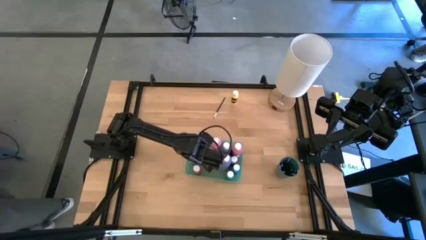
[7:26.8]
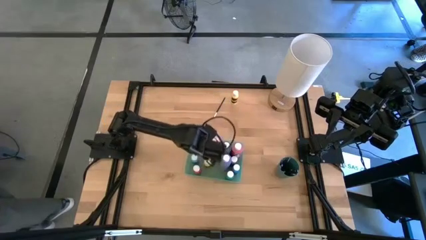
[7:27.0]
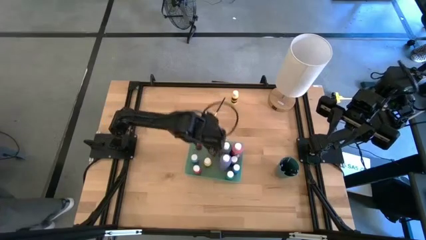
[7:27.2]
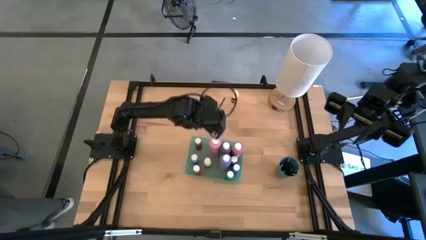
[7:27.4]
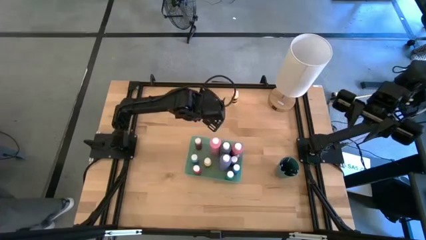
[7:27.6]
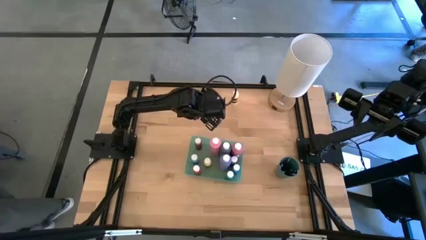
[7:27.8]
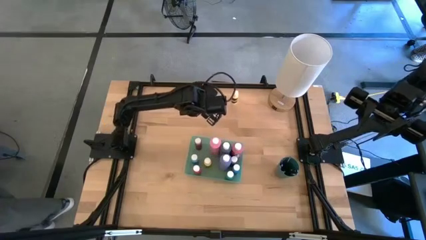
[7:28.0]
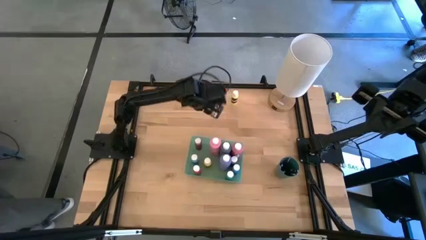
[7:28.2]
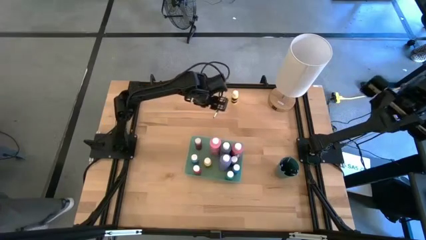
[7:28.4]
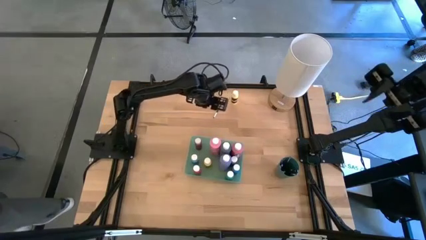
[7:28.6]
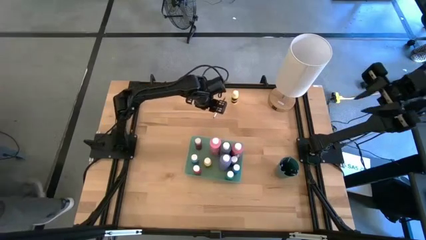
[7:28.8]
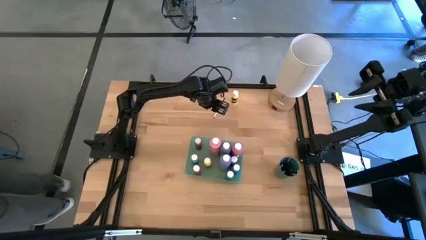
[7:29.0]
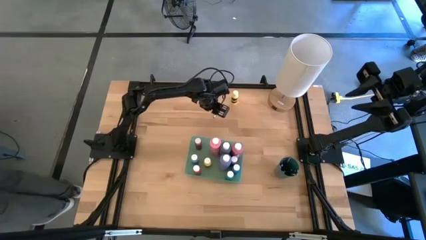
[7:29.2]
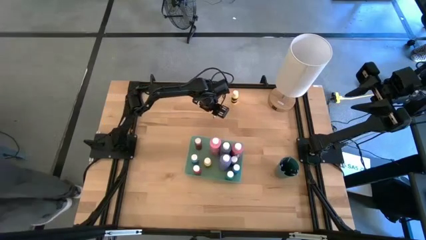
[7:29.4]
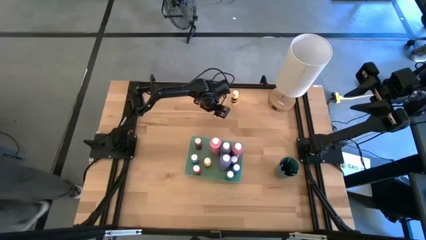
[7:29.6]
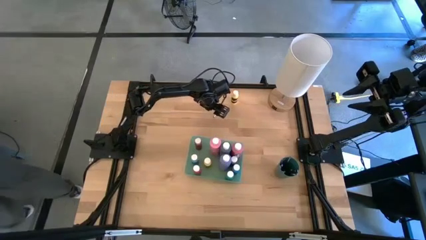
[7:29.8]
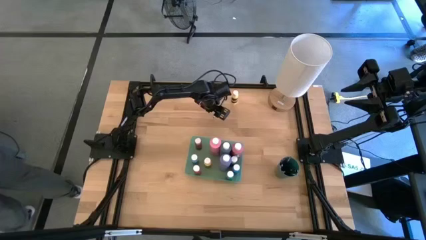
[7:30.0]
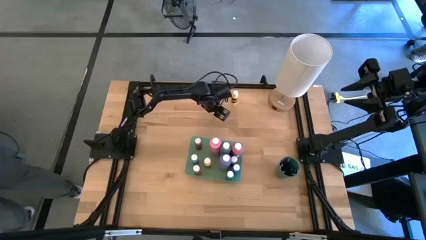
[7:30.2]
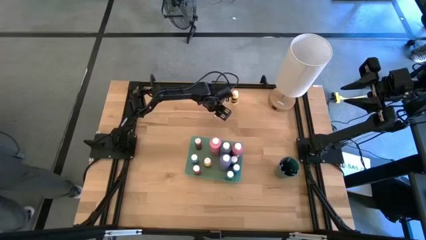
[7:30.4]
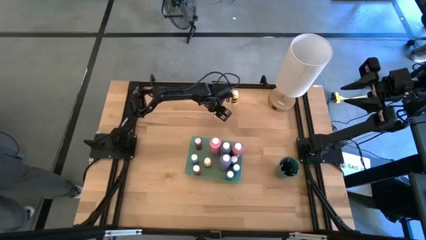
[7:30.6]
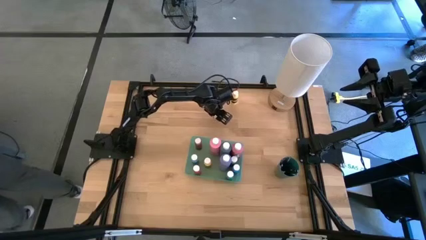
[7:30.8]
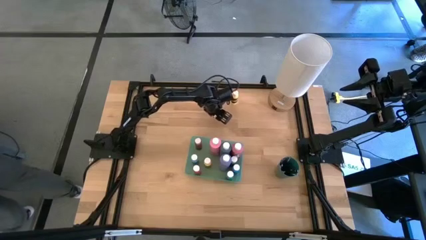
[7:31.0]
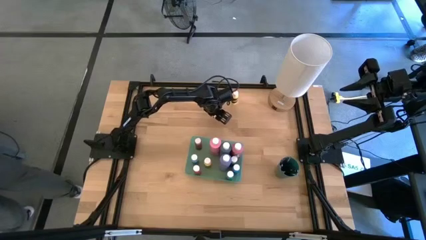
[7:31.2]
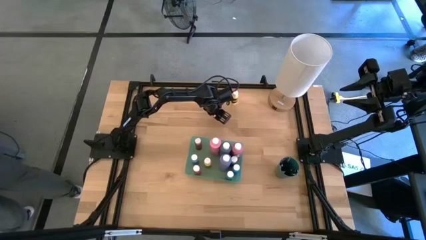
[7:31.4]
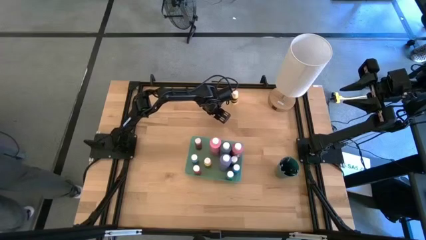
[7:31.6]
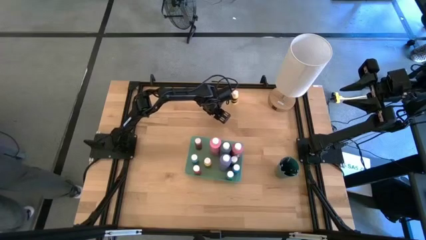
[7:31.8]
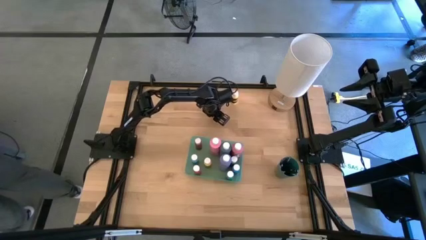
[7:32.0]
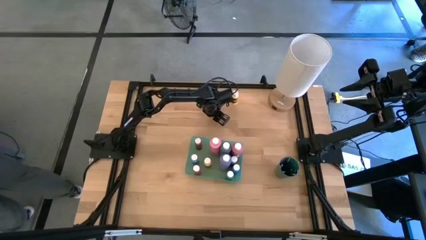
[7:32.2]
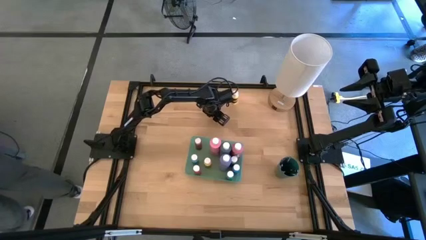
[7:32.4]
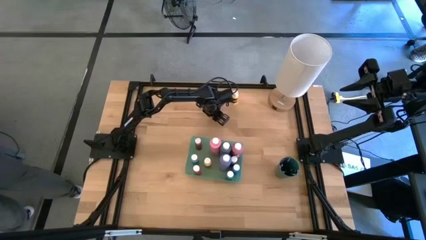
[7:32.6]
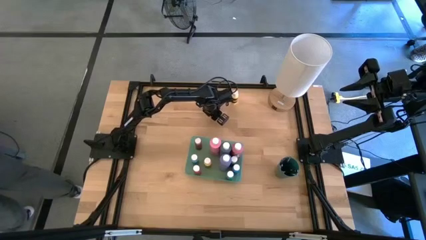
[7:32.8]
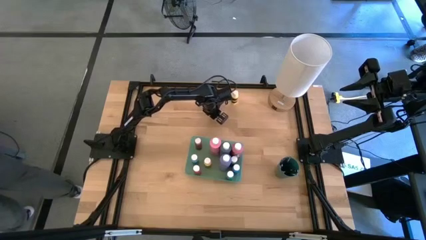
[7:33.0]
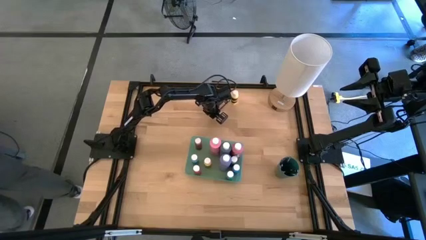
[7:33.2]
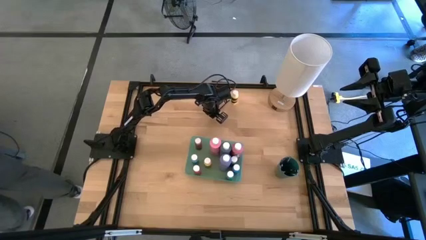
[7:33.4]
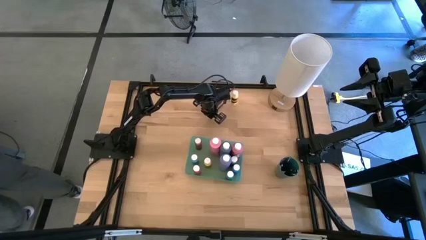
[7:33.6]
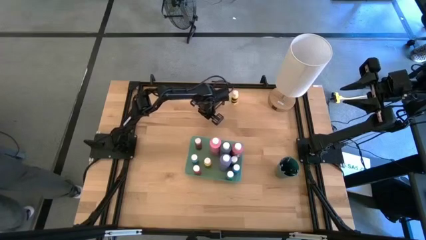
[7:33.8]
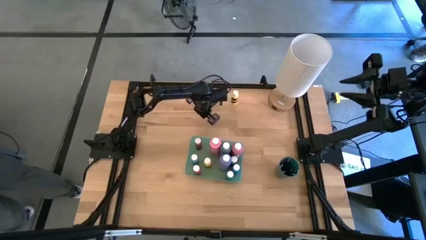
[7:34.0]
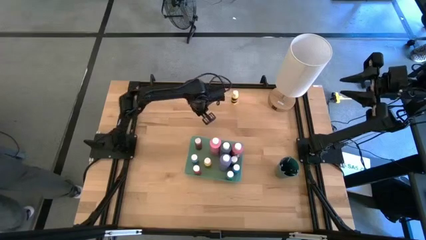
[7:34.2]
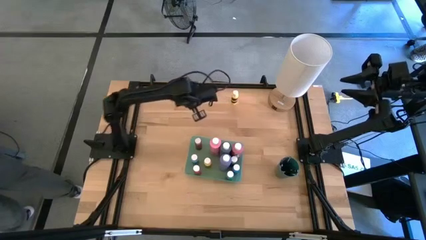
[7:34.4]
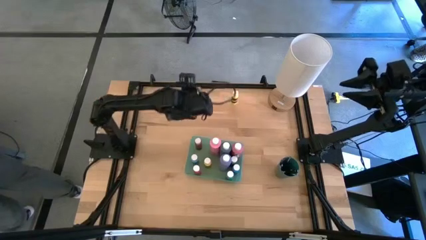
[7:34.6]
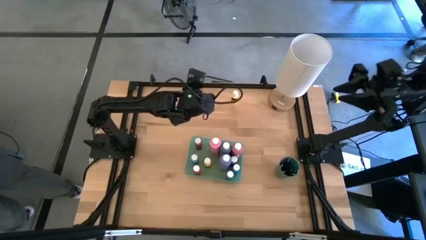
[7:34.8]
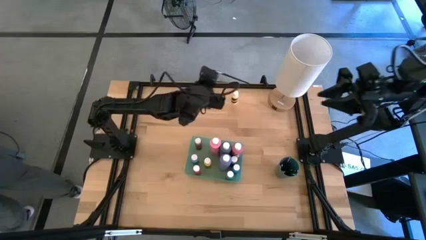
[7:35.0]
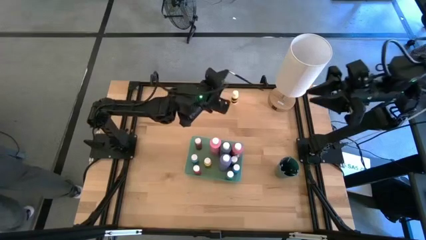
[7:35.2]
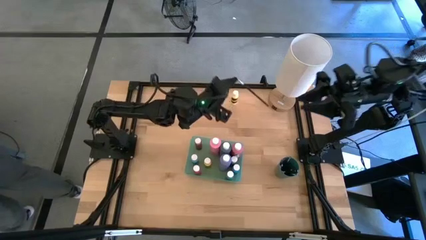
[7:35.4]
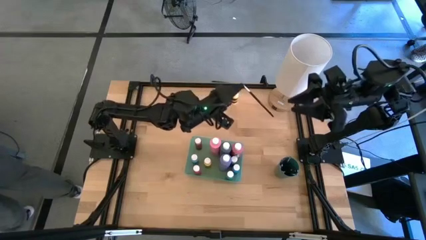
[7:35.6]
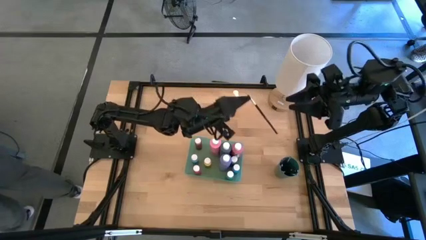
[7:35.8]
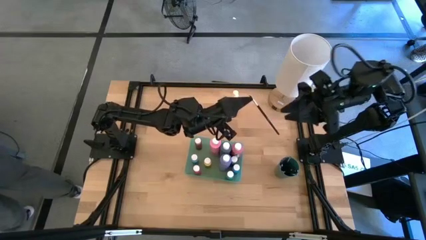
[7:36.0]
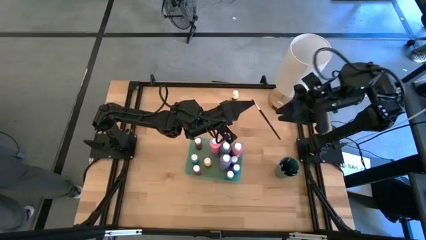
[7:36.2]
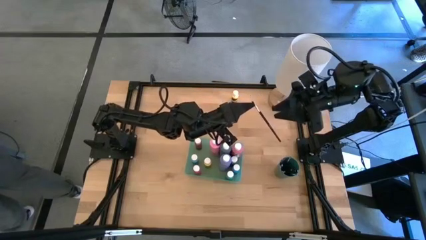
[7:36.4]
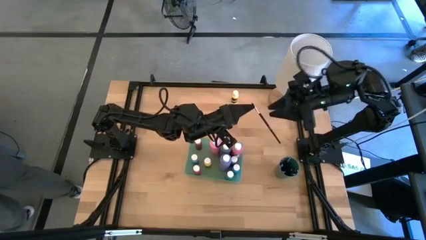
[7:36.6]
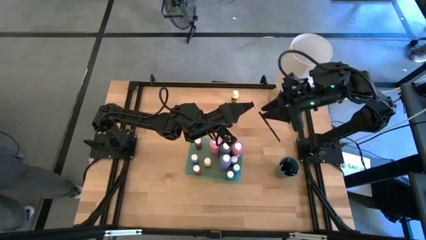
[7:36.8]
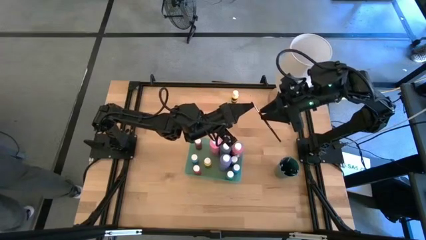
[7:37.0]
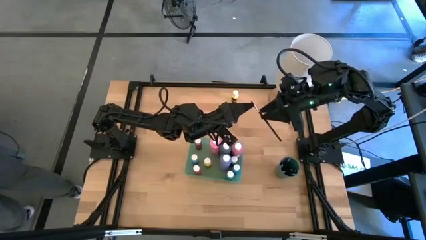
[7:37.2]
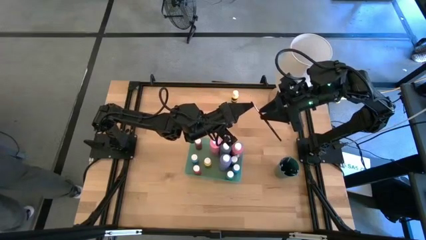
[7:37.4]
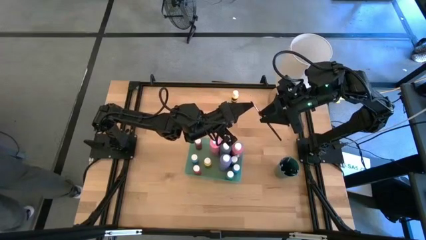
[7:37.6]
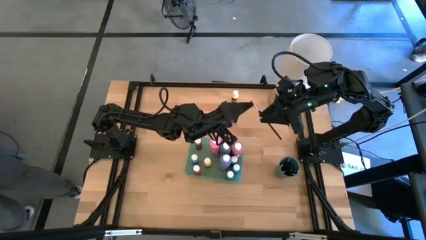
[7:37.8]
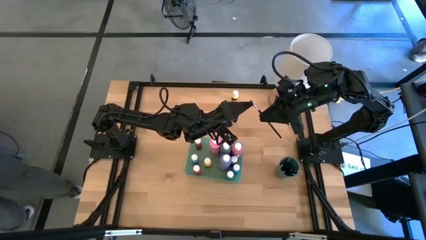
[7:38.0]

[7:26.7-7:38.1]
Task: Pick & Place Paint Supplies
Put the black eyeshadow brush into the green cup
